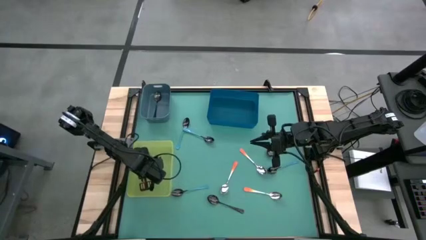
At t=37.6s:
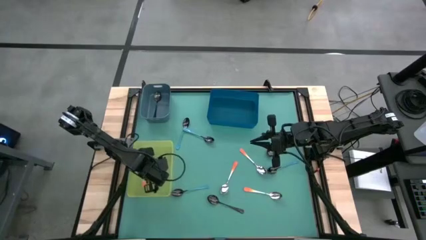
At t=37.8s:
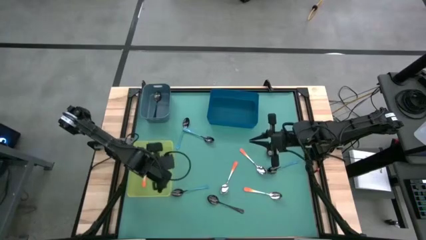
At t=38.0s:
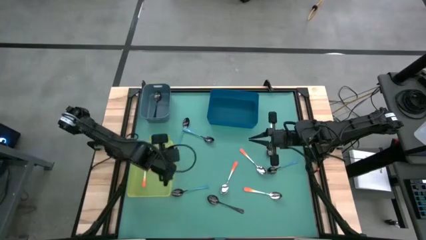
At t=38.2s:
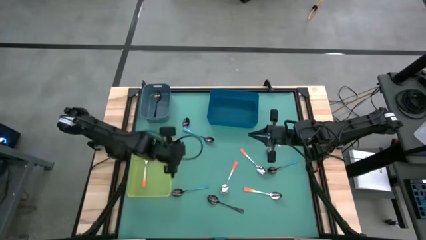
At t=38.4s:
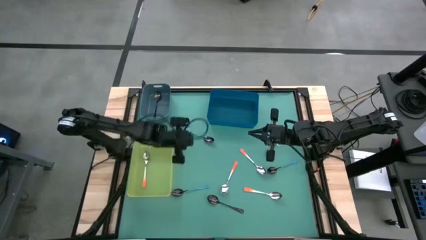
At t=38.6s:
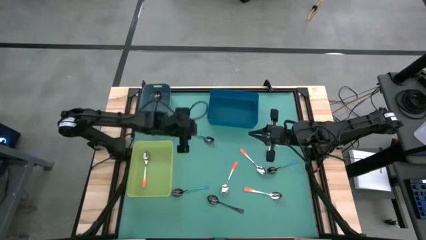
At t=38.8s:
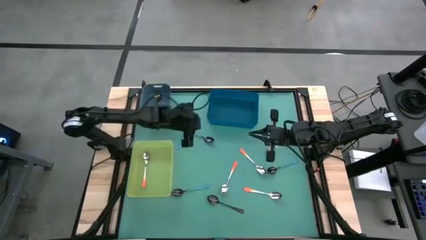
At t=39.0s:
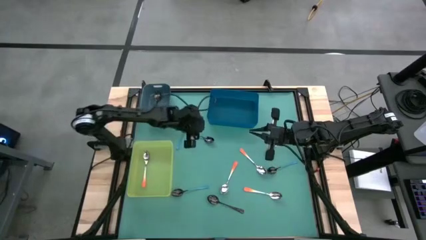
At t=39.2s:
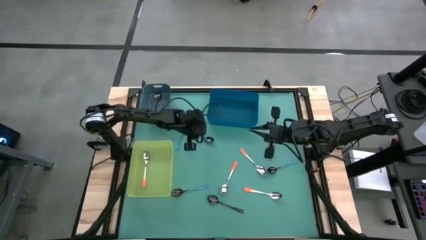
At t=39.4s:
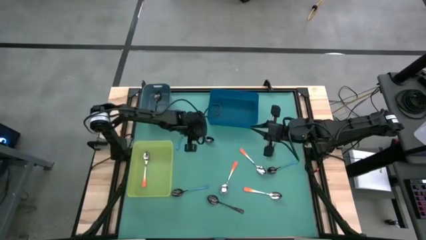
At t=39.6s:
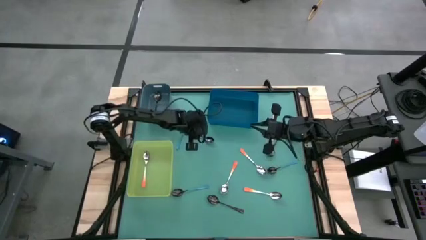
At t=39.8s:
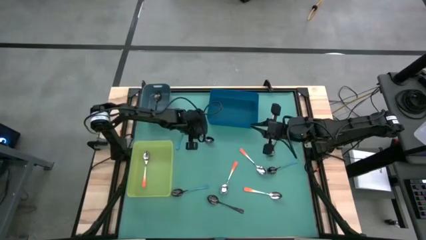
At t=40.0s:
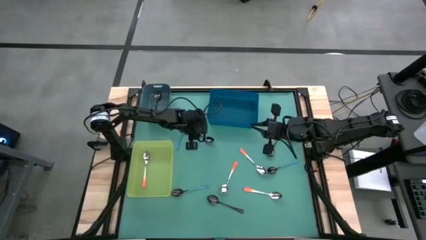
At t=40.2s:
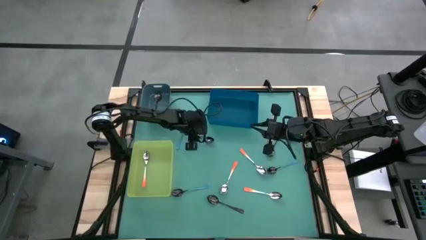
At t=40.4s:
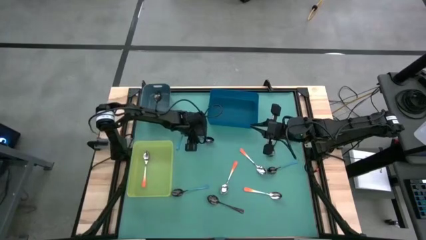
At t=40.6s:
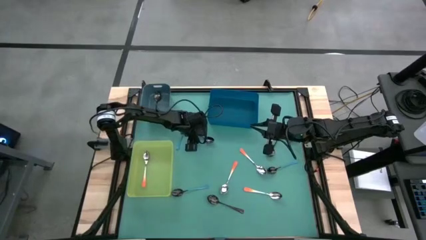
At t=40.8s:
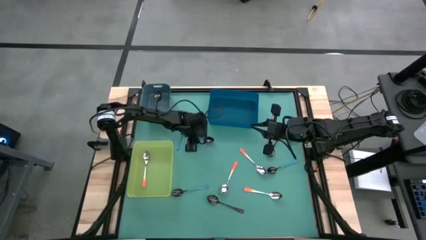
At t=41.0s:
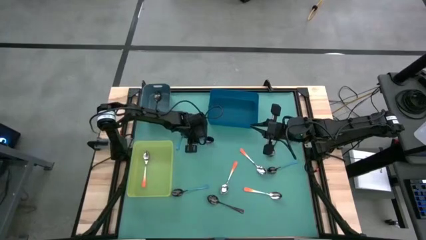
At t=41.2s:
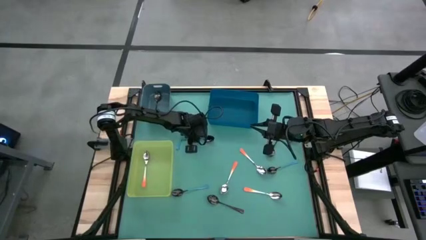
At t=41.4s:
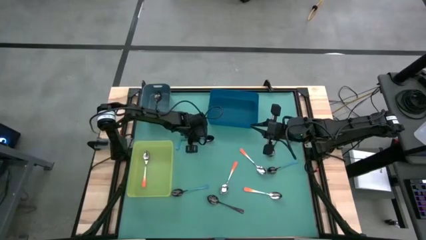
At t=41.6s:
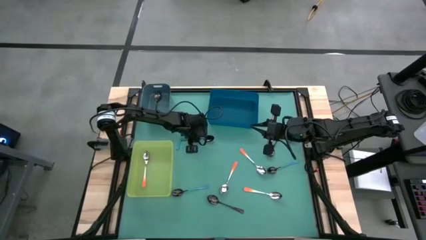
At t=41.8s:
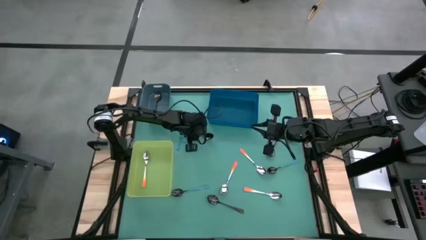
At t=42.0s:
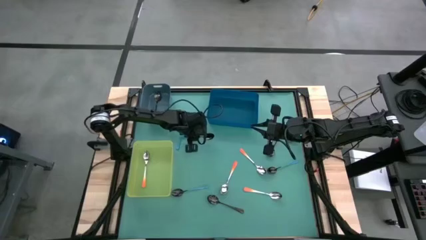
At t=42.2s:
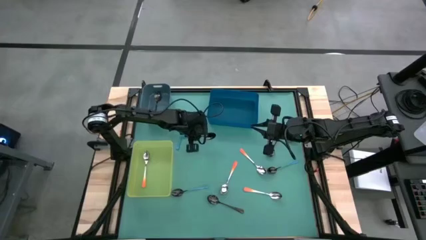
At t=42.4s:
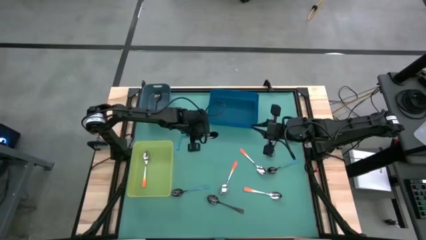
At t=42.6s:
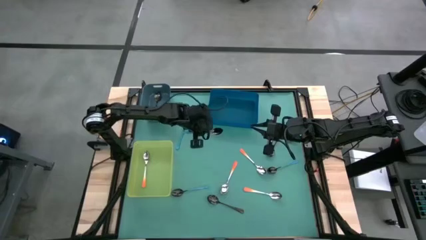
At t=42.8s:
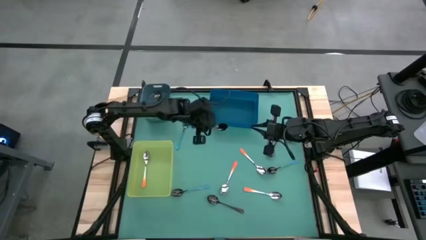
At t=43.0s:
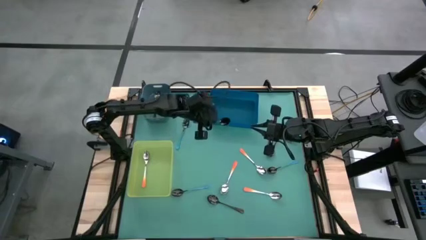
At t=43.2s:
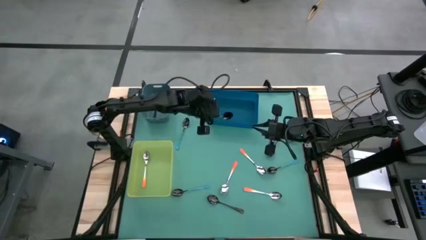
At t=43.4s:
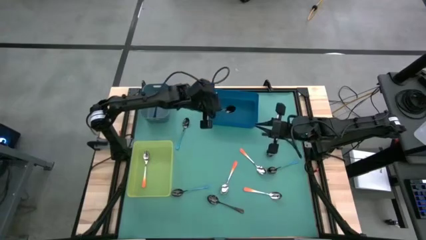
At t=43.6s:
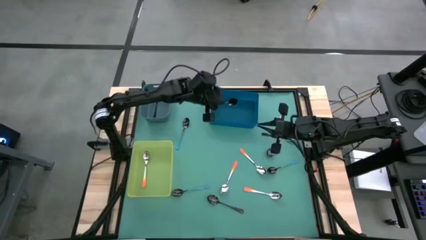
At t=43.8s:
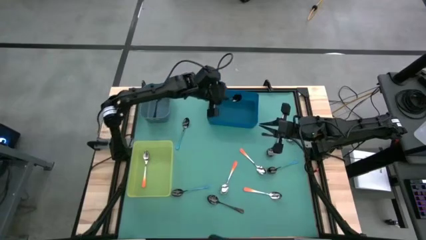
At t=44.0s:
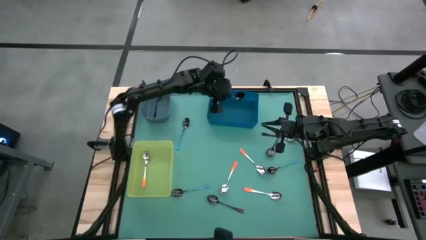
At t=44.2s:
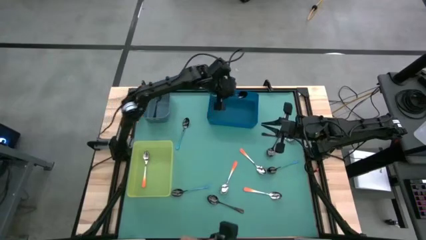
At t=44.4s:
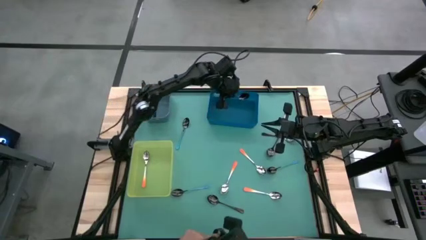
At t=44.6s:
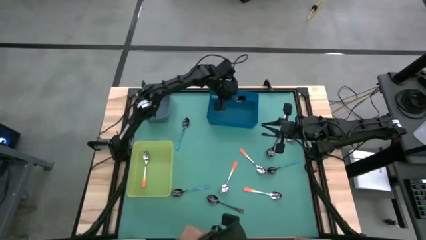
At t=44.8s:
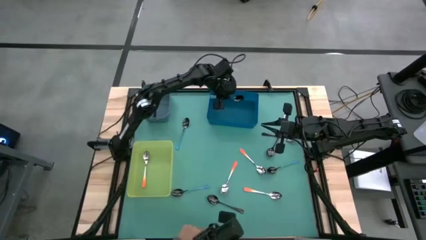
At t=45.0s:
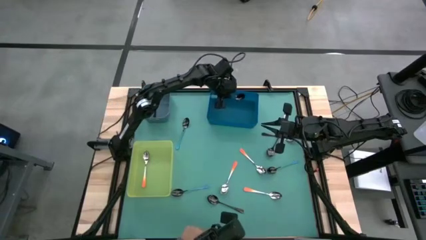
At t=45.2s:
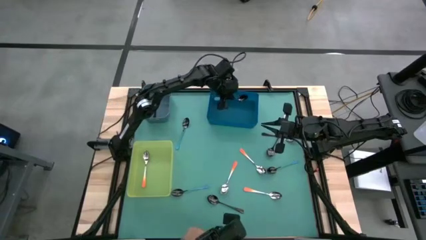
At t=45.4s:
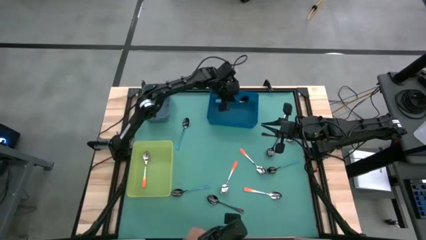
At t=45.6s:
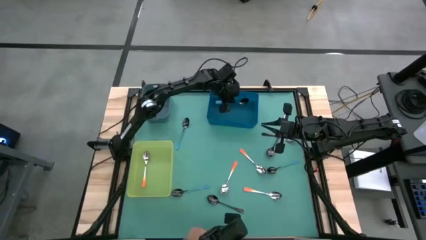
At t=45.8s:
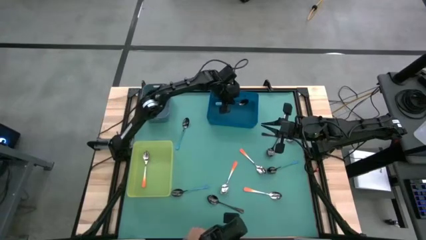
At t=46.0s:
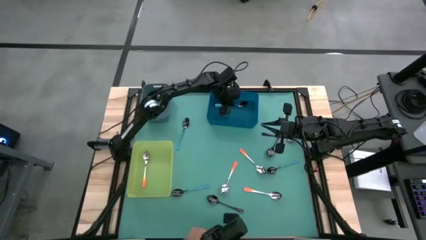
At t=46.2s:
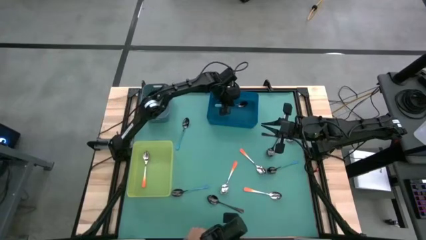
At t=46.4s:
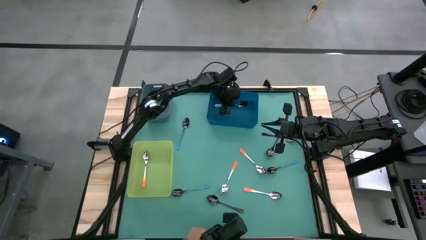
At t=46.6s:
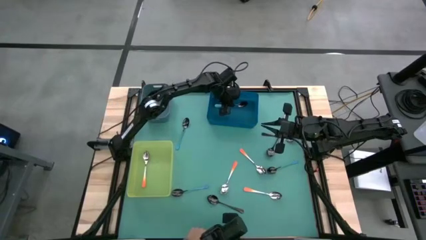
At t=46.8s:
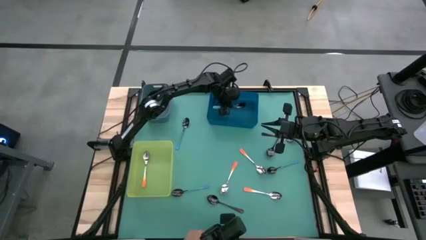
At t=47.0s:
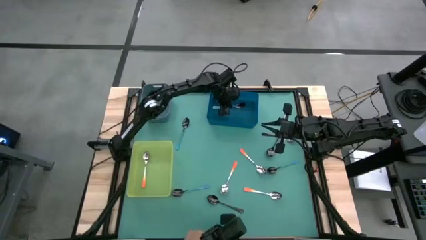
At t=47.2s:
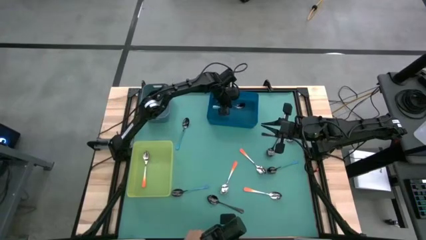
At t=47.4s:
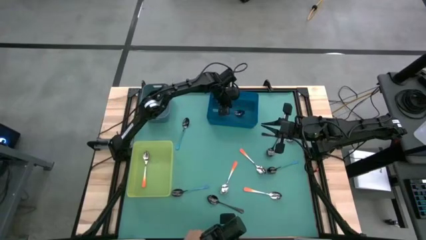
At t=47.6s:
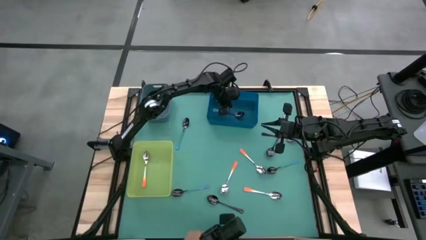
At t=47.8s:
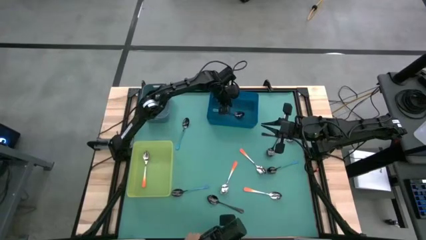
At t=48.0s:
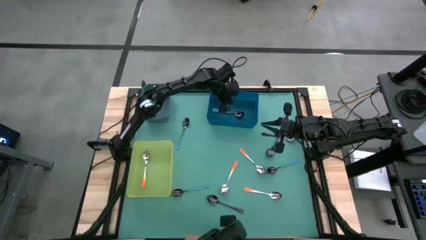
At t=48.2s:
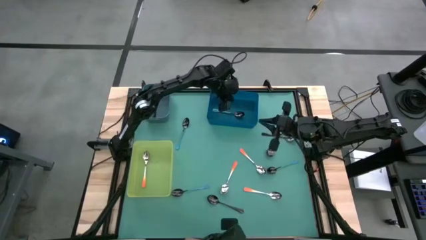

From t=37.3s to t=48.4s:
Task: Sort silverware by color (type)
Put the blue spoon into the dark blue bin
